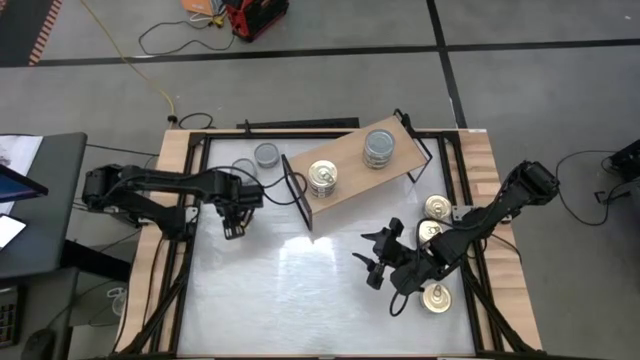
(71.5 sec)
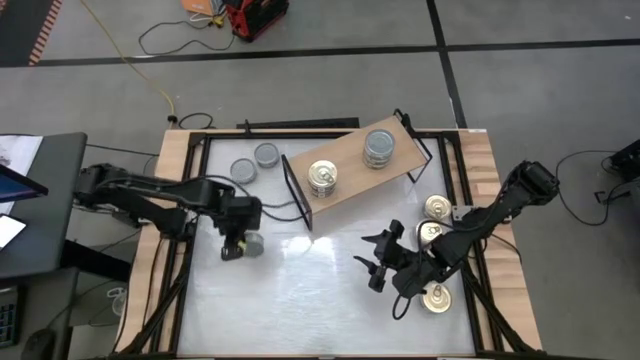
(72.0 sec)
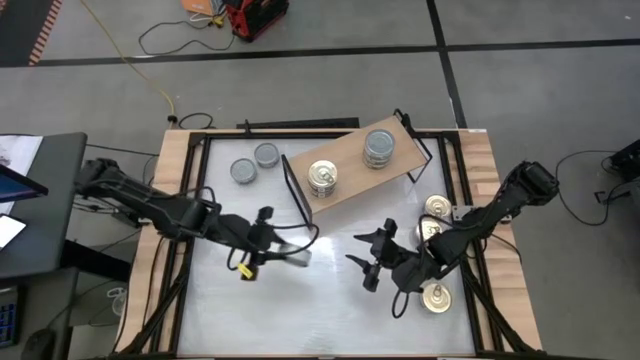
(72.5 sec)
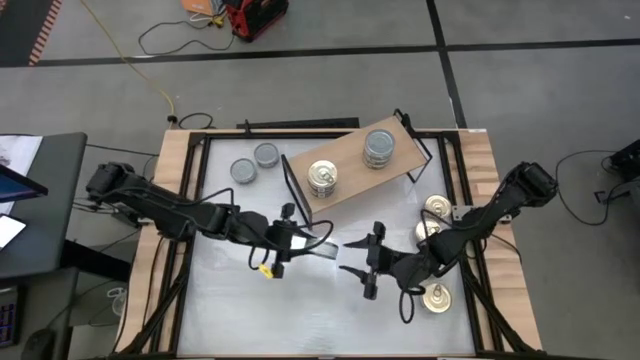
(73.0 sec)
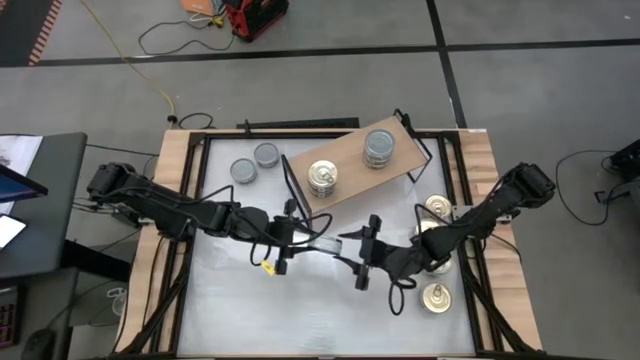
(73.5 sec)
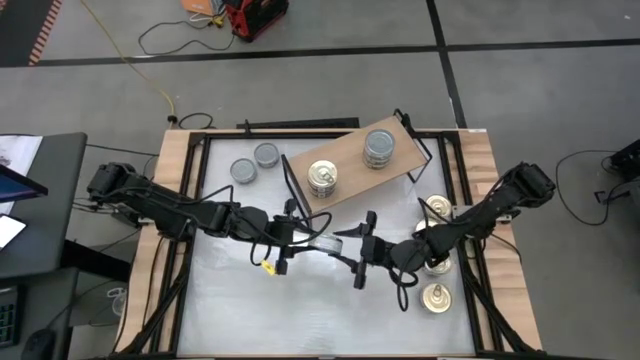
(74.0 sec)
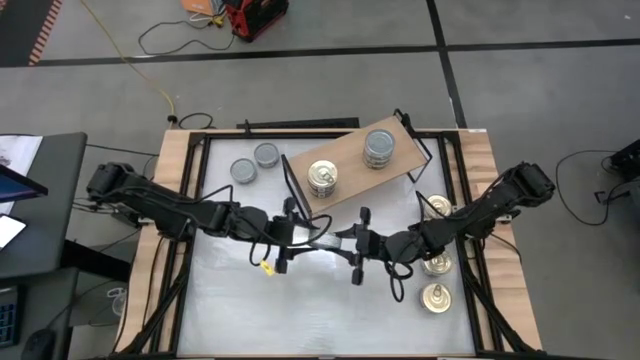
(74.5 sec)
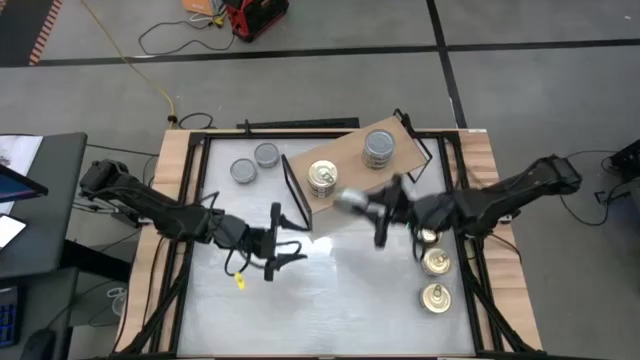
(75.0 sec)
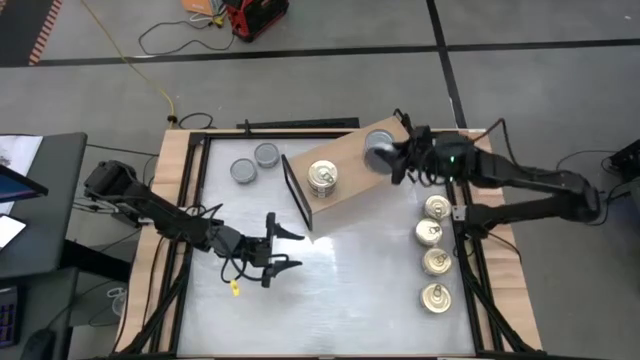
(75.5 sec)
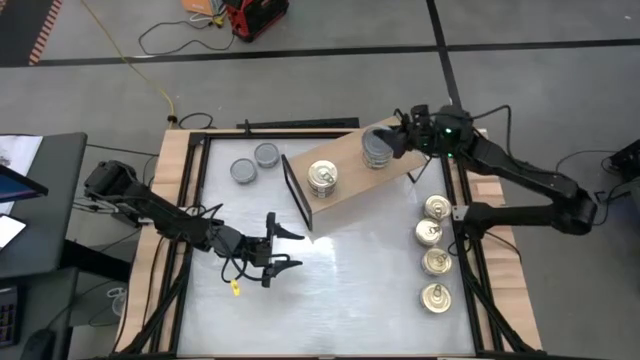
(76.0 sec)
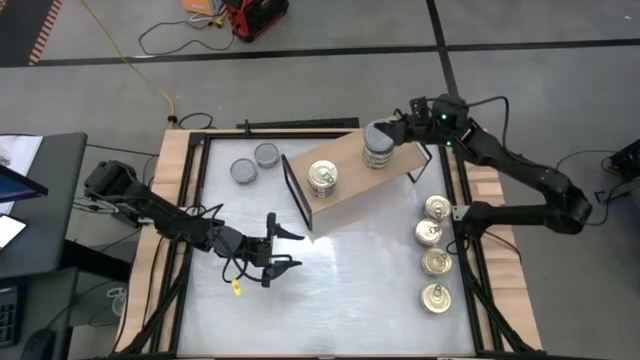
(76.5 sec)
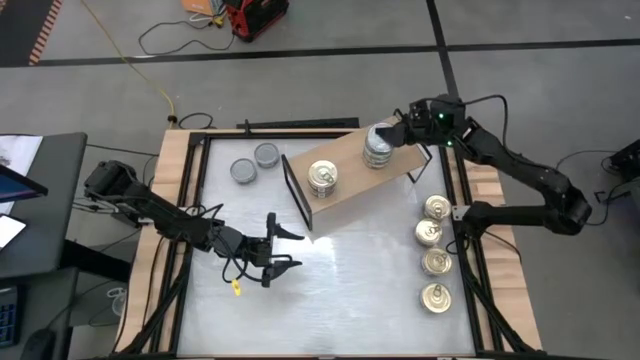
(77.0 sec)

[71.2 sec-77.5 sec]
Task: Stack canned seafood by type on shelf
Stack the green tuna can on top of the green tuna can

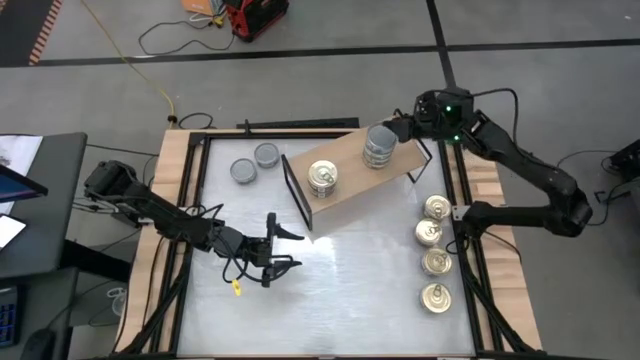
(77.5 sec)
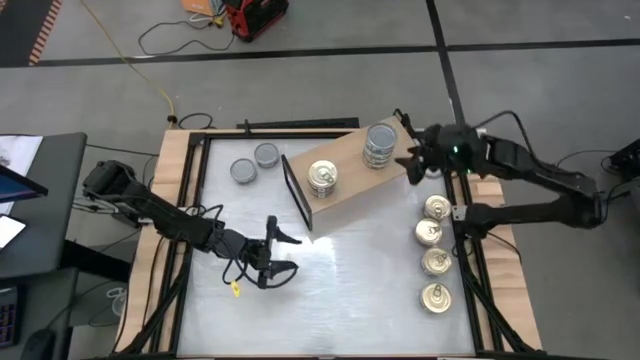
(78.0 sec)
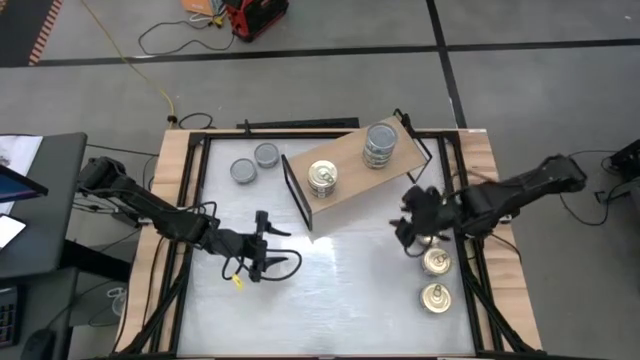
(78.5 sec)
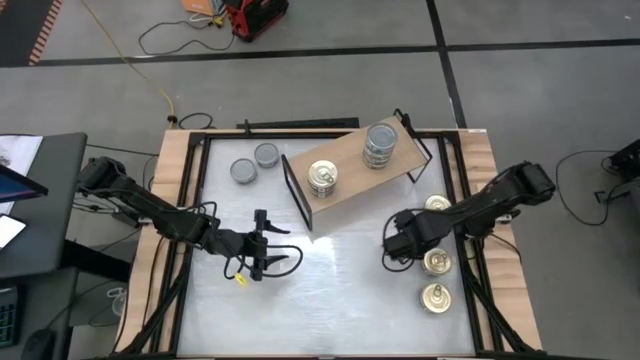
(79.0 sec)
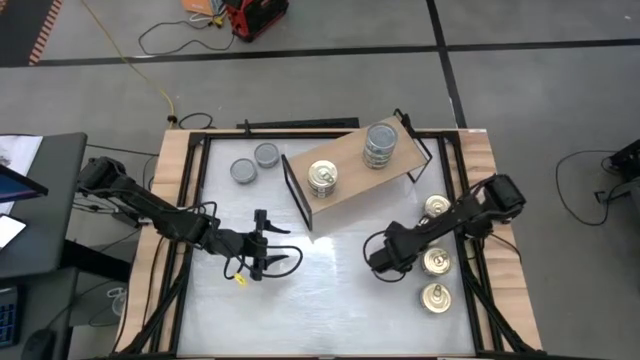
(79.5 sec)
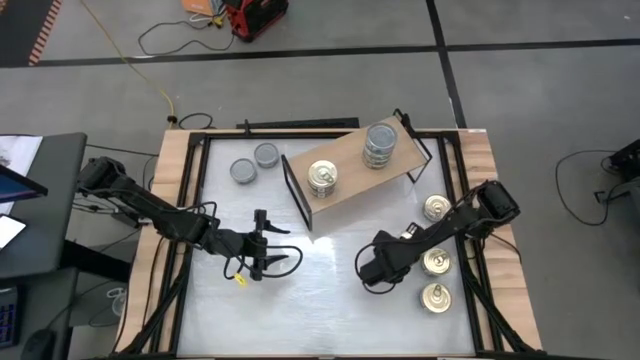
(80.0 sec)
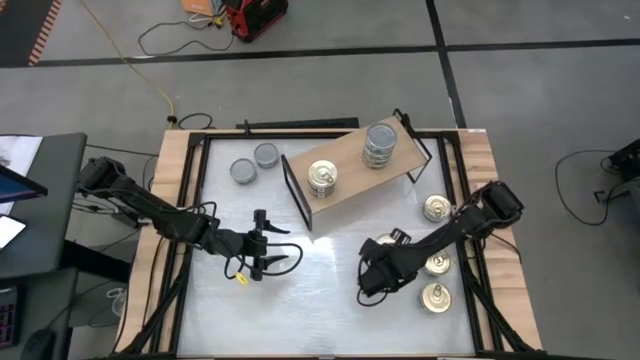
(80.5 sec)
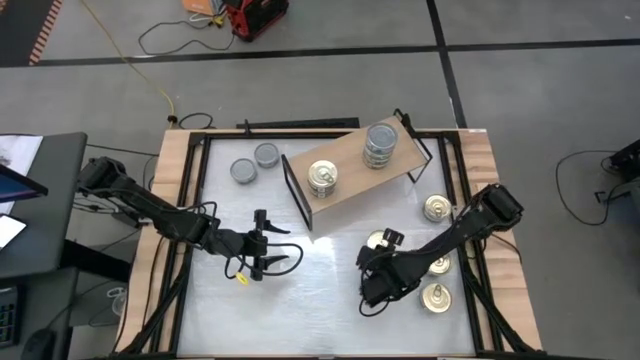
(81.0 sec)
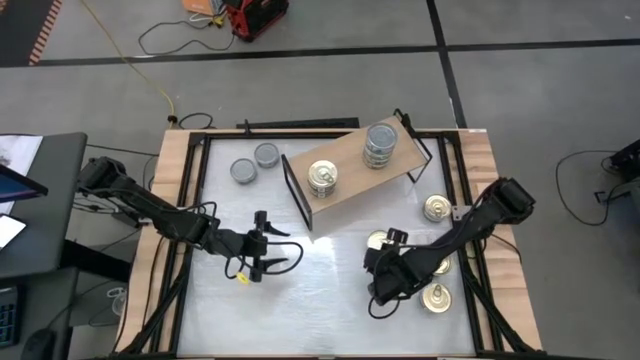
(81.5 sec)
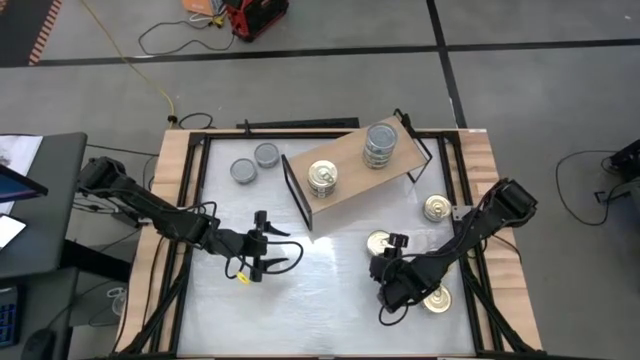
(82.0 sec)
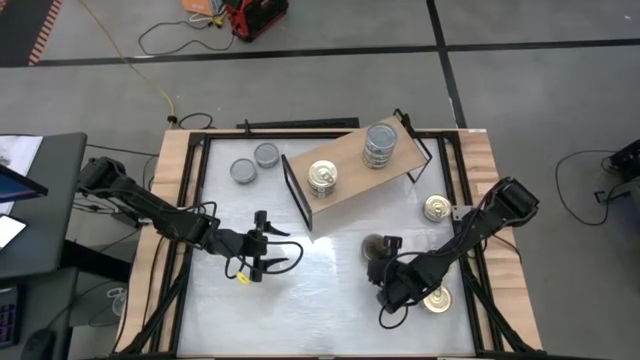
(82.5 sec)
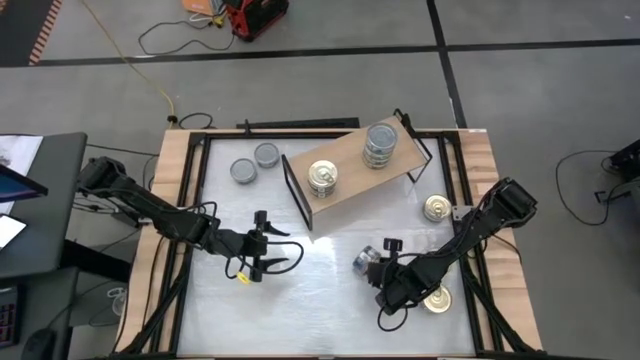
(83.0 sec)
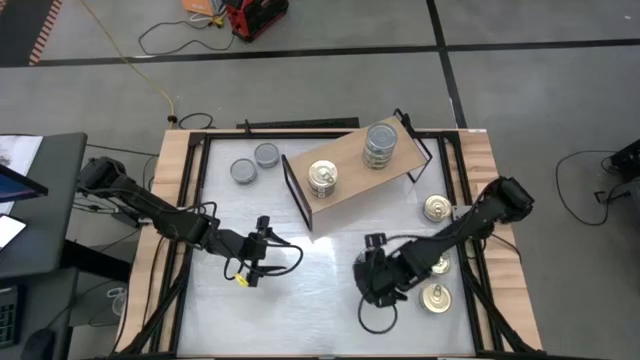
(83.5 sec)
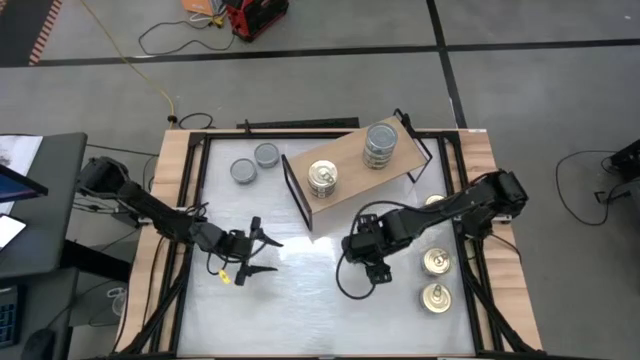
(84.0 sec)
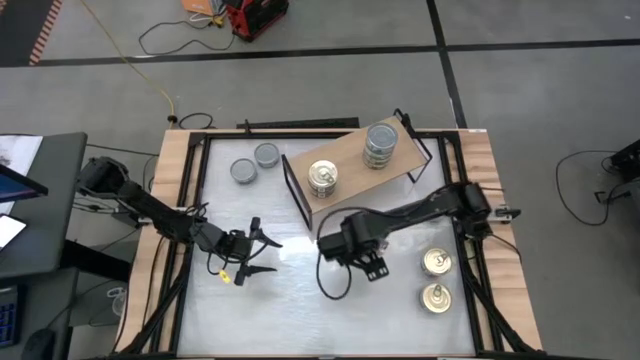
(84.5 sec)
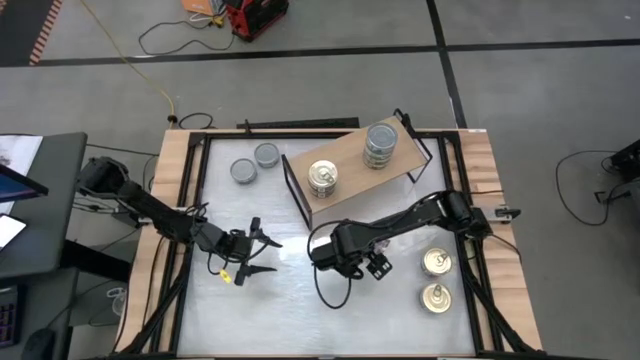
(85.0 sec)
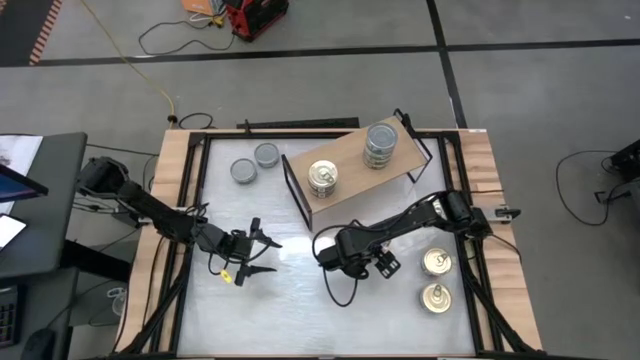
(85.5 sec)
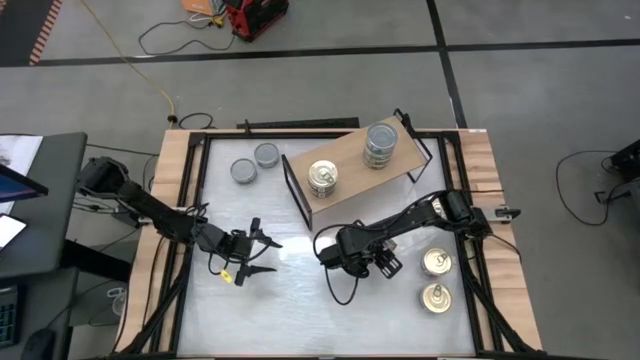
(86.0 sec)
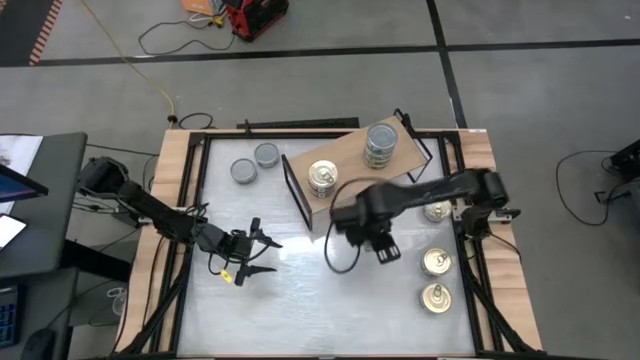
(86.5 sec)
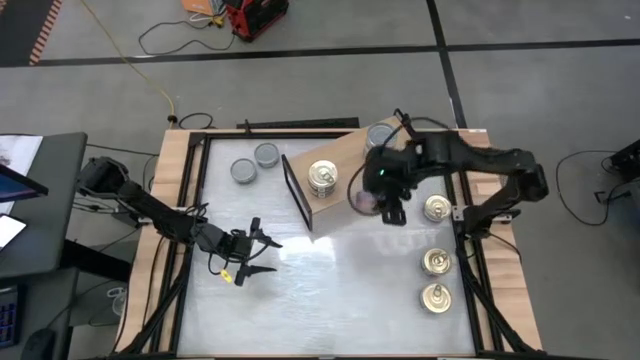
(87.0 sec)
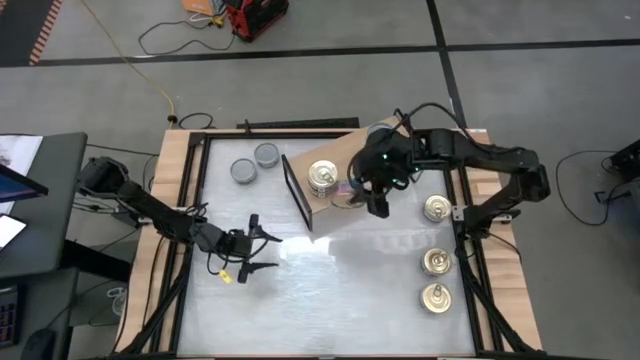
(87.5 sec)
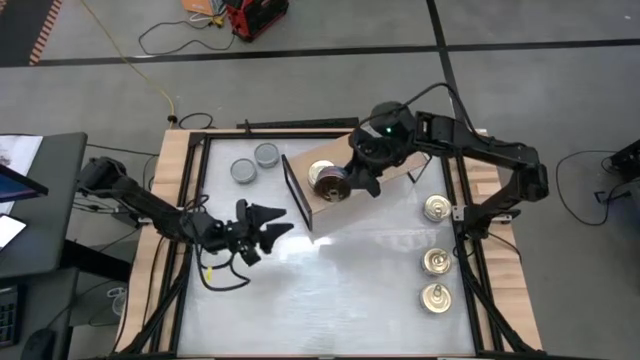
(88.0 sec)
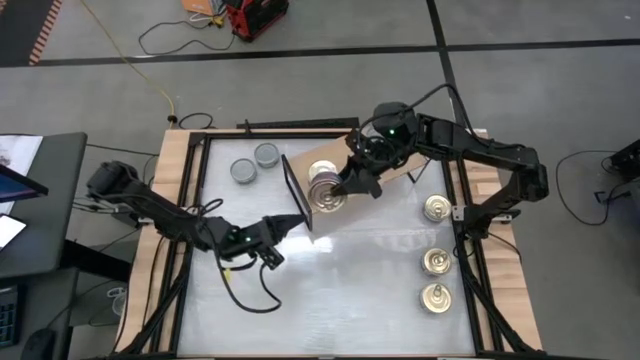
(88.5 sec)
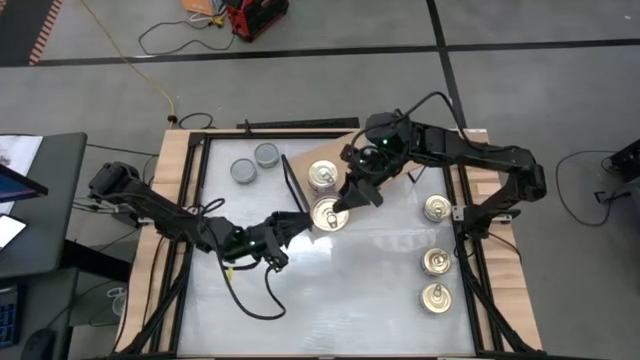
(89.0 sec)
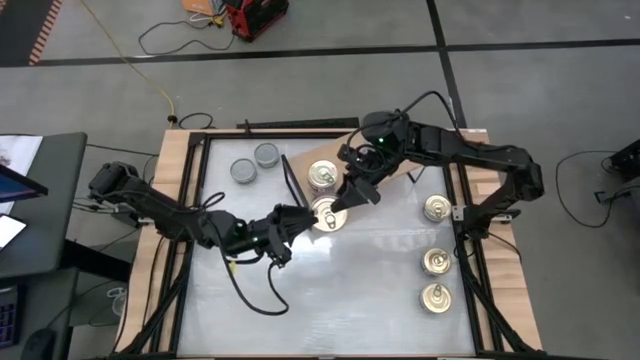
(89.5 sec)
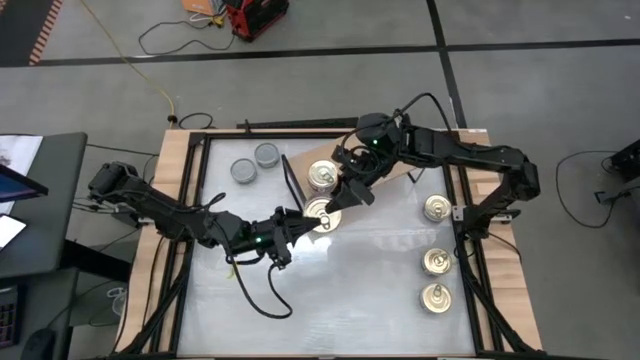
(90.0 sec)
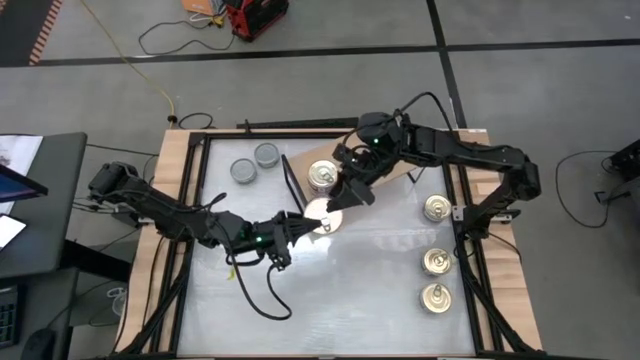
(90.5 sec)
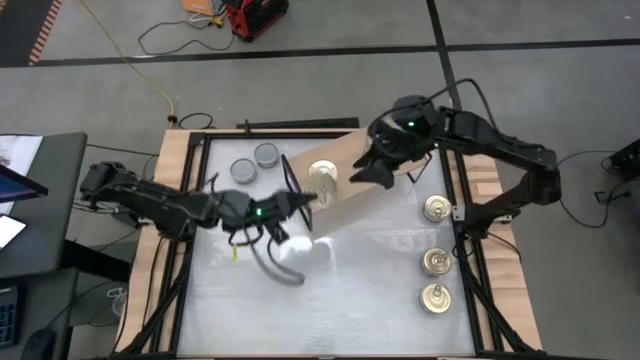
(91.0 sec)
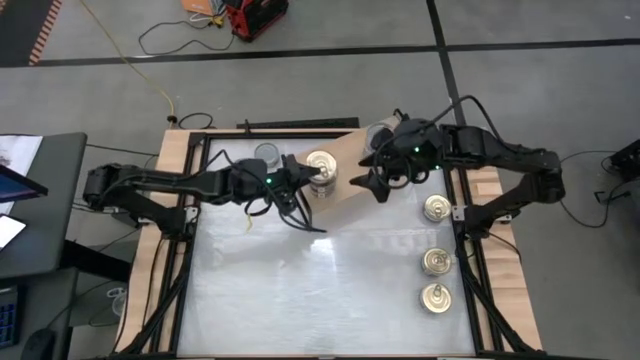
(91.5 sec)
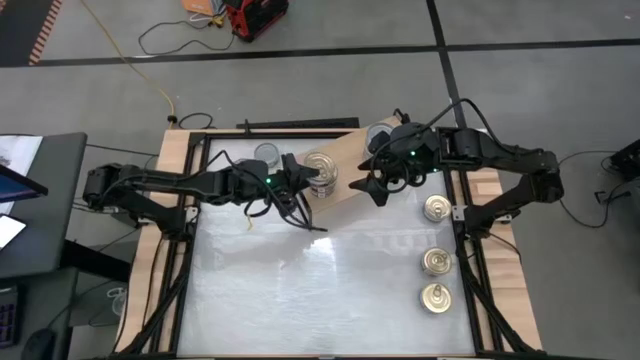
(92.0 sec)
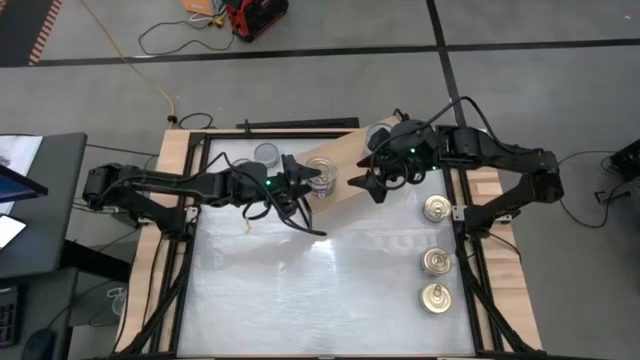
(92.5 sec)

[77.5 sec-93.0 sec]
Stack the blue tuna can on top of the blue tuna can

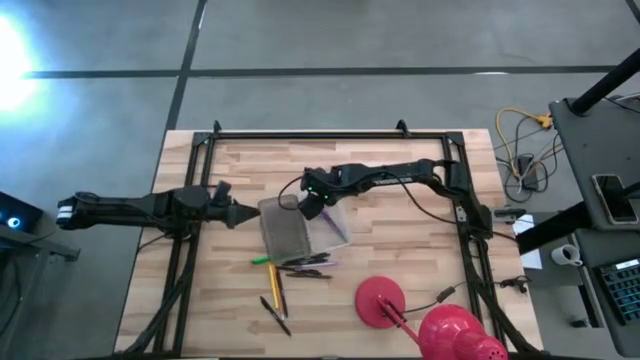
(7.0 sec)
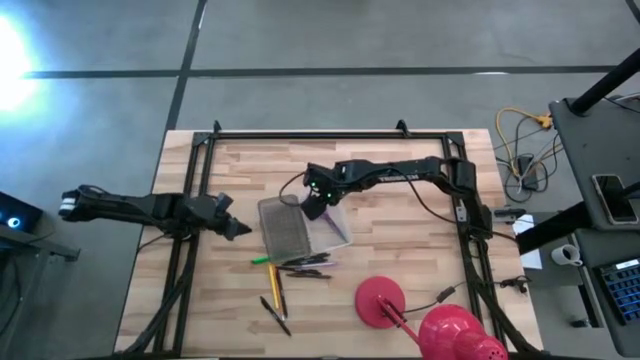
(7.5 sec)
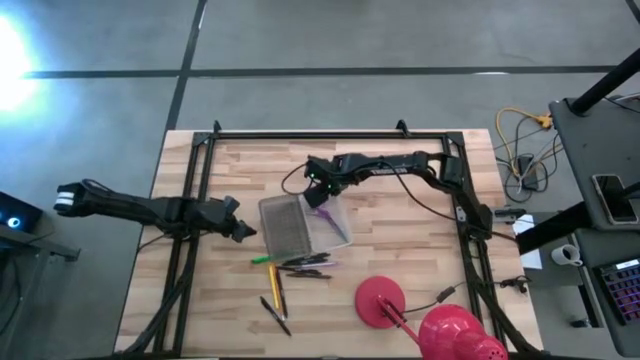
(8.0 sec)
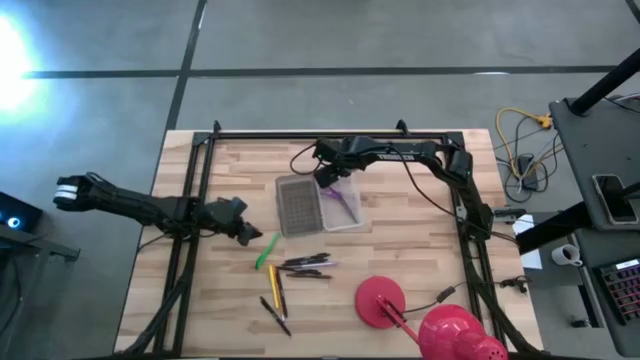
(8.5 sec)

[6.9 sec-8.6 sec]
Task: Pick & place school supplies into a supply box
Adjust the black supply box on the table
